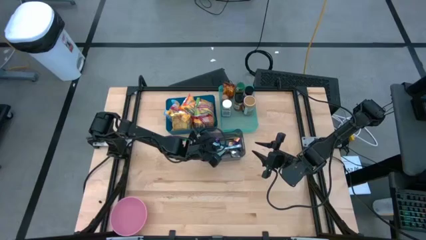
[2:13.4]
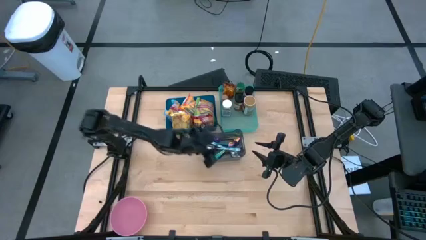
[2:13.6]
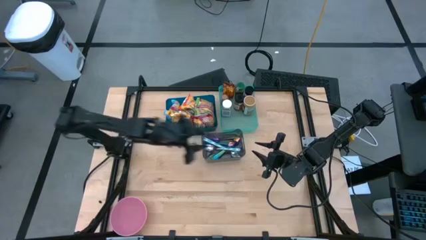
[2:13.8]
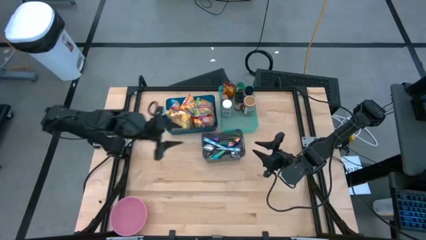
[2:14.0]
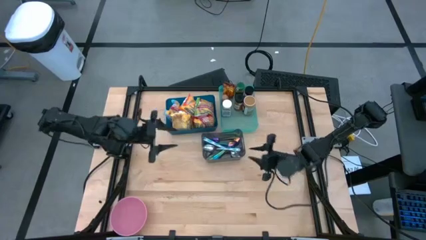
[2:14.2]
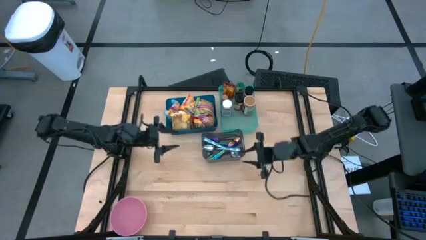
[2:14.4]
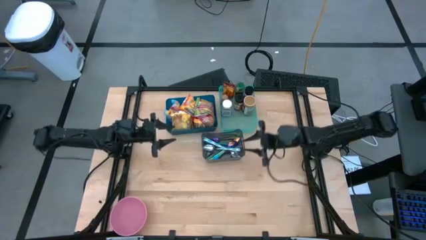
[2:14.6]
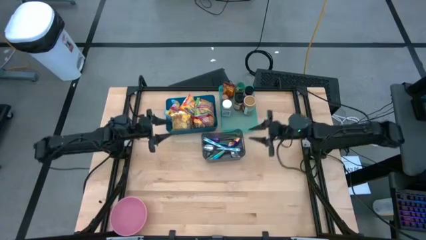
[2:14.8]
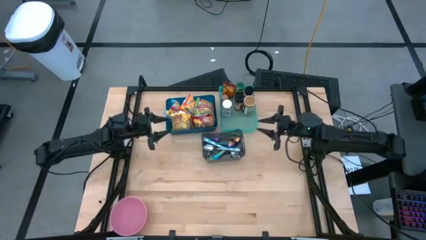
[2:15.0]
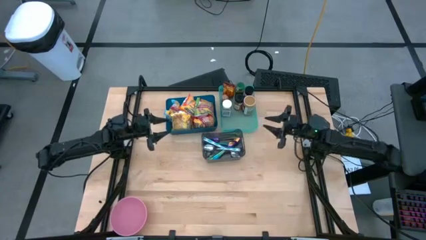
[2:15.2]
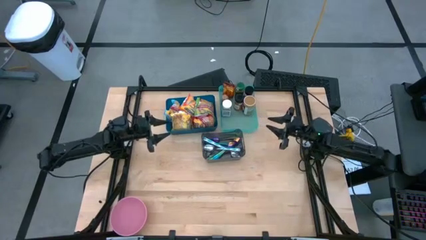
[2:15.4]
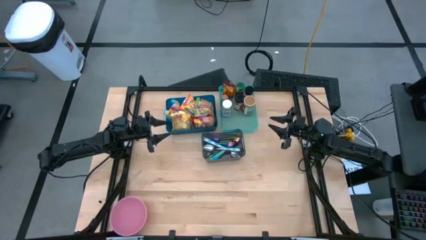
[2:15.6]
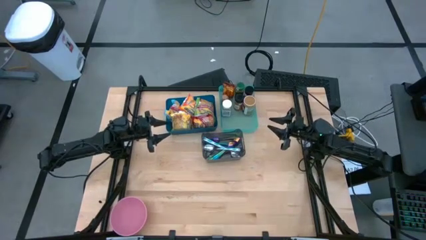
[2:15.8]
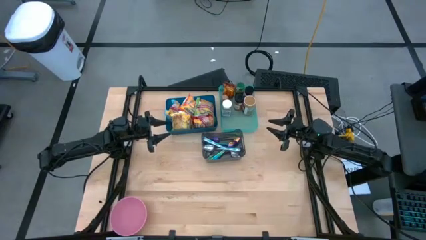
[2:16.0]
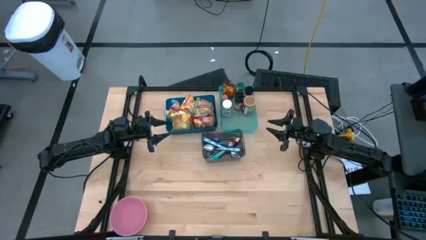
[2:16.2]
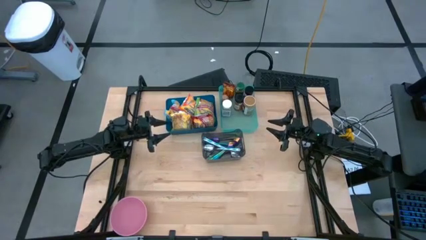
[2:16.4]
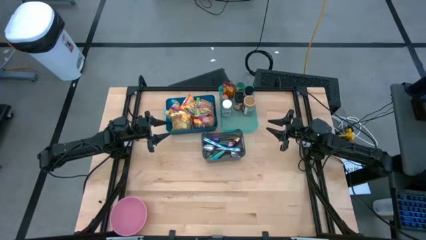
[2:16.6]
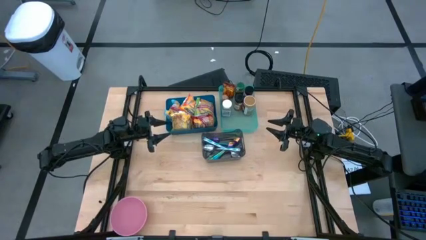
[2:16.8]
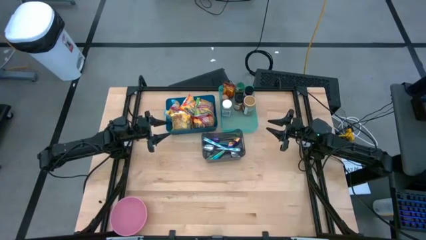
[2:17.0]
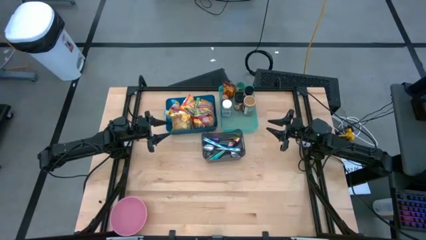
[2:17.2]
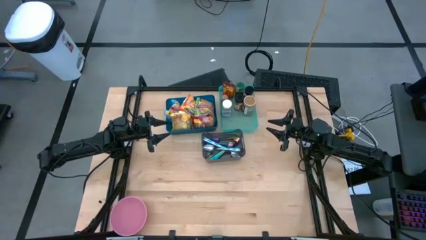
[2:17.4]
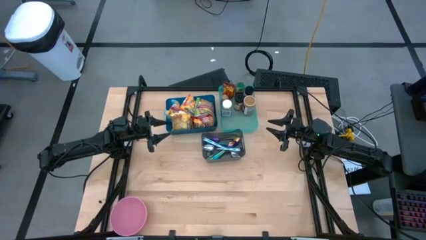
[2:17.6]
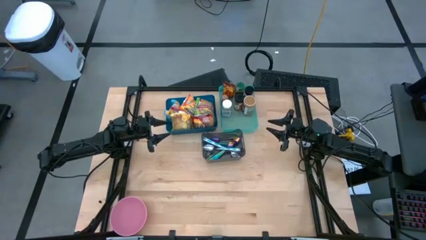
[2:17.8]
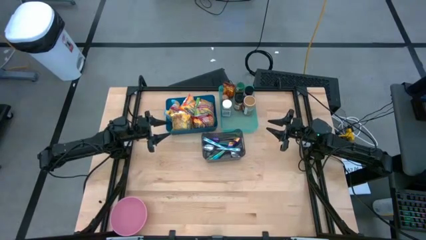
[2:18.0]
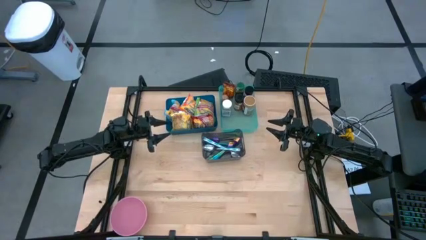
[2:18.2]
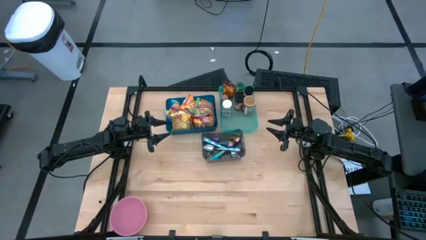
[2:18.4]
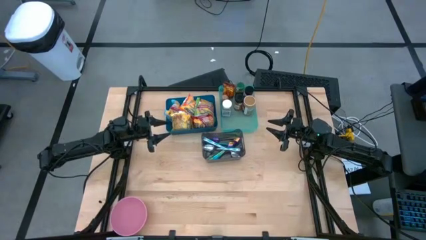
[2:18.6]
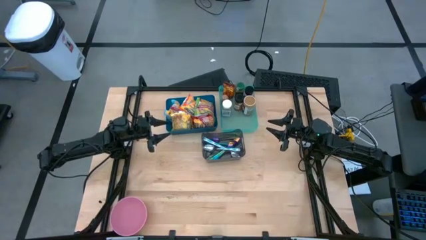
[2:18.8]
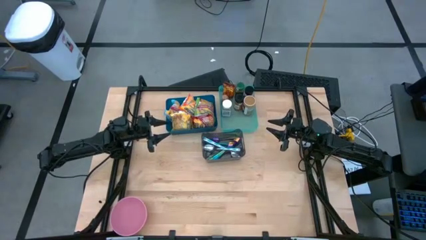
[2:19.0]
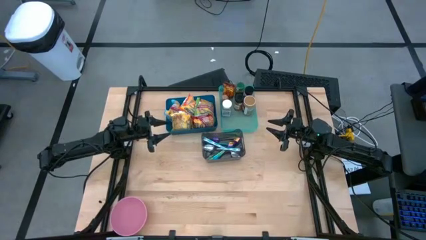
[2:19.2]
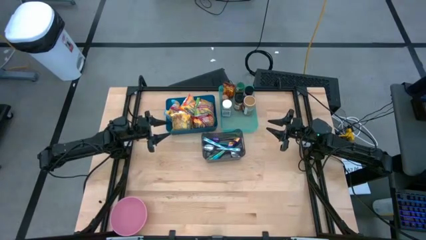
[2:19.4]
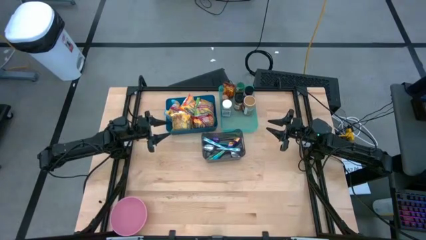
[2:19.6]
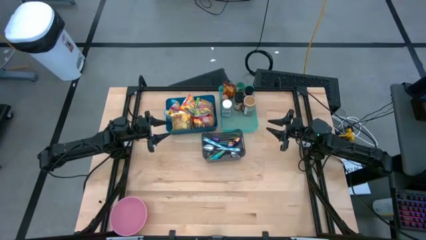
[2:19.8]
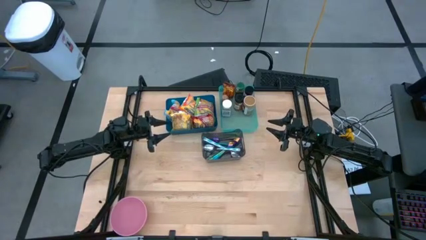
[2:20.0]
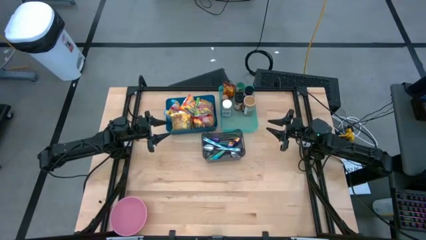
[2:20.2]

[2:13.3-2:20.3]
Task: Pick & Place Food Item
Return to Home Position

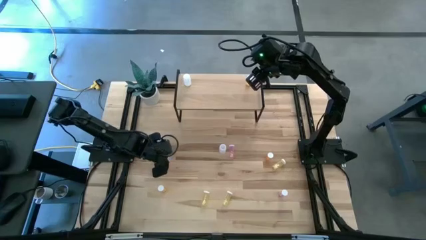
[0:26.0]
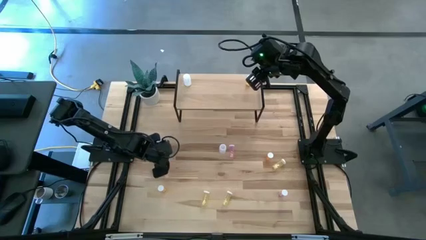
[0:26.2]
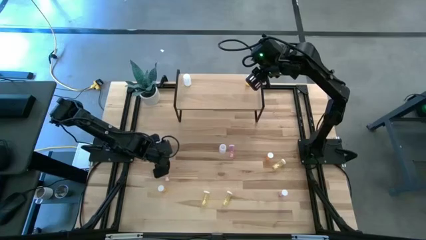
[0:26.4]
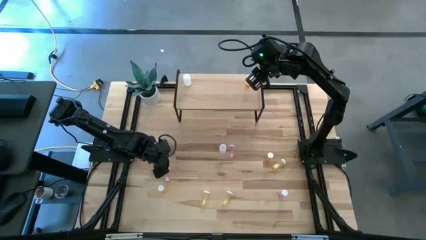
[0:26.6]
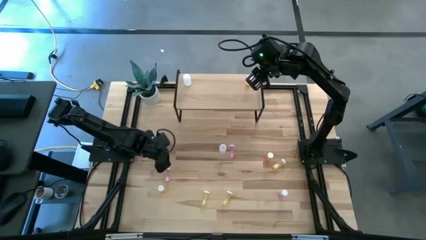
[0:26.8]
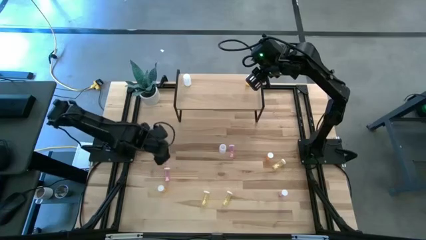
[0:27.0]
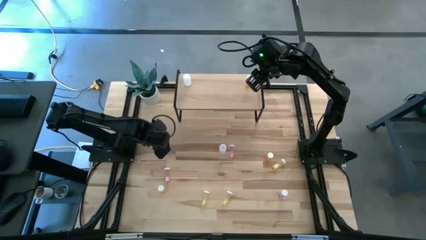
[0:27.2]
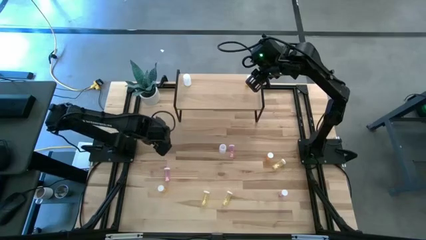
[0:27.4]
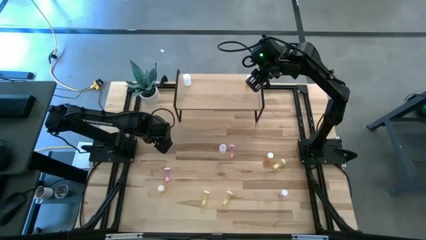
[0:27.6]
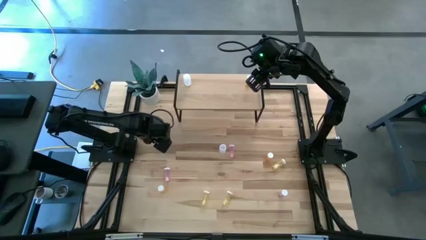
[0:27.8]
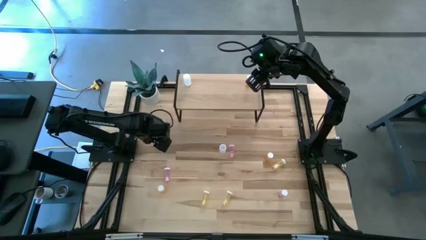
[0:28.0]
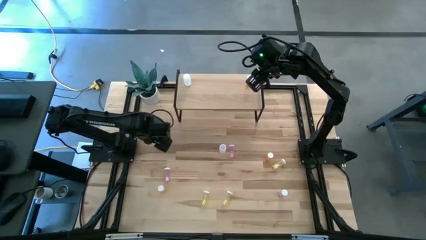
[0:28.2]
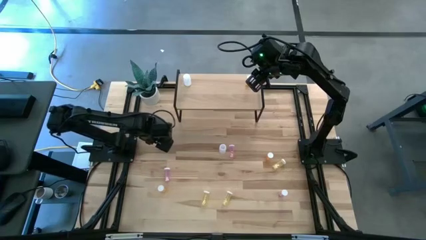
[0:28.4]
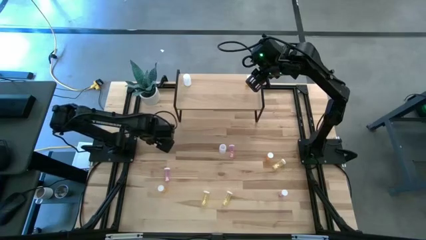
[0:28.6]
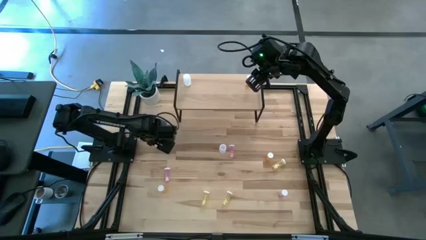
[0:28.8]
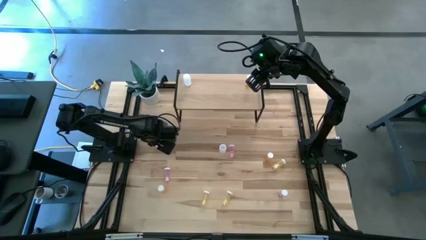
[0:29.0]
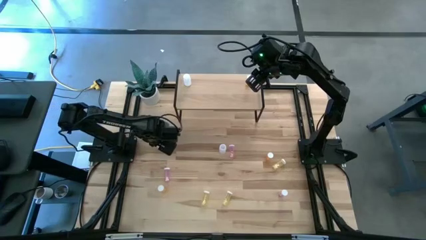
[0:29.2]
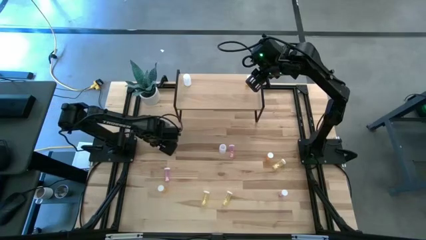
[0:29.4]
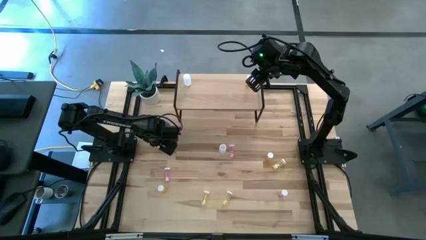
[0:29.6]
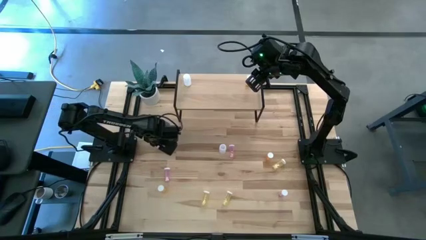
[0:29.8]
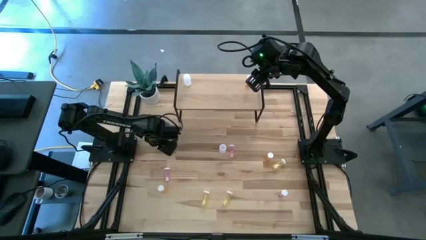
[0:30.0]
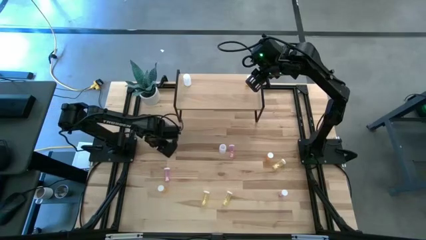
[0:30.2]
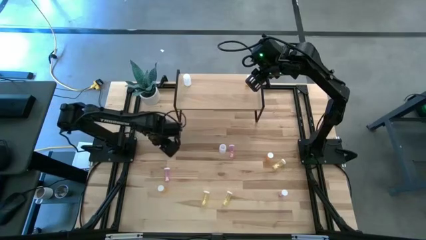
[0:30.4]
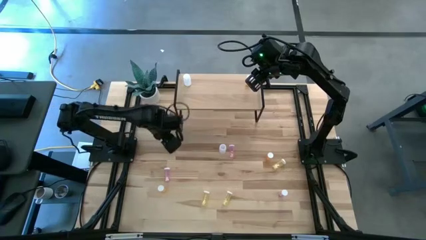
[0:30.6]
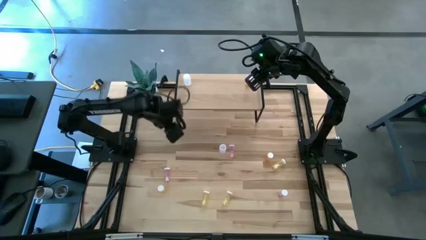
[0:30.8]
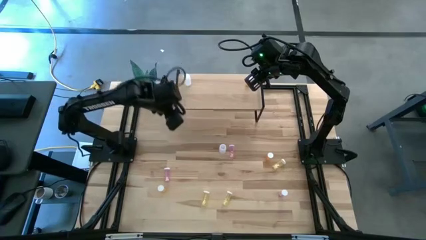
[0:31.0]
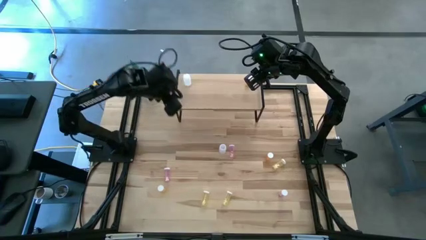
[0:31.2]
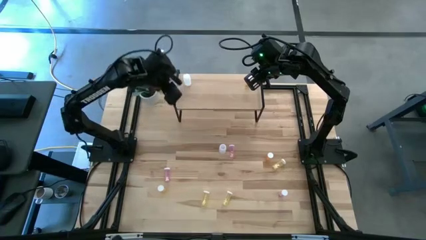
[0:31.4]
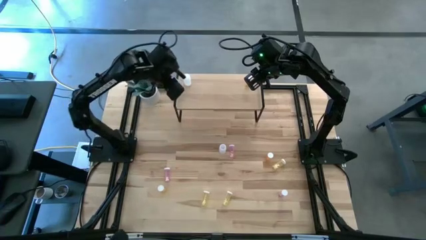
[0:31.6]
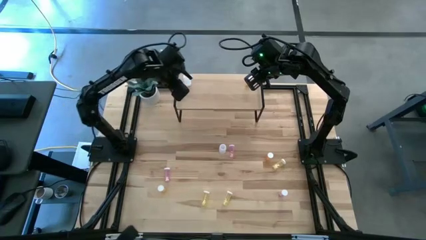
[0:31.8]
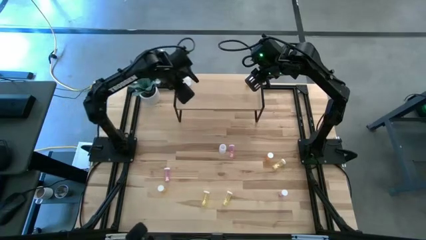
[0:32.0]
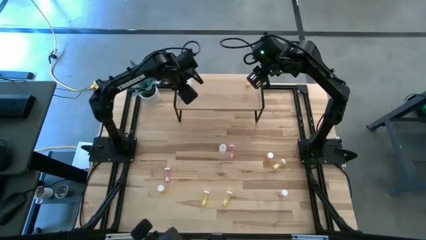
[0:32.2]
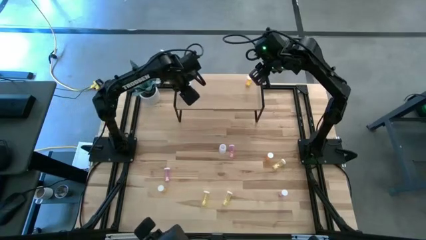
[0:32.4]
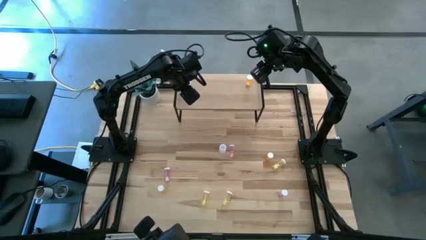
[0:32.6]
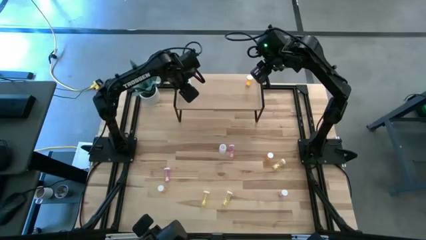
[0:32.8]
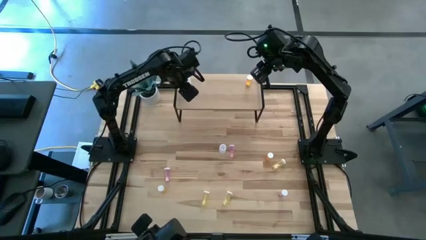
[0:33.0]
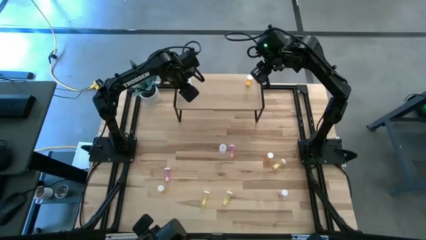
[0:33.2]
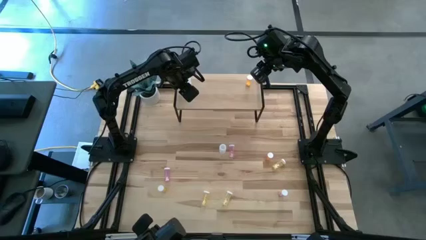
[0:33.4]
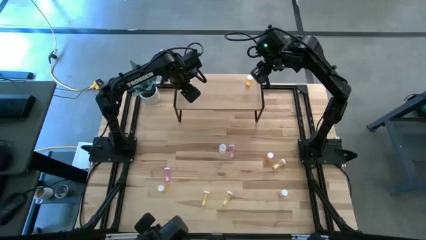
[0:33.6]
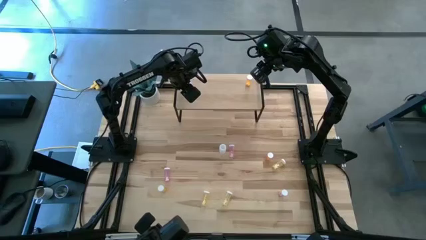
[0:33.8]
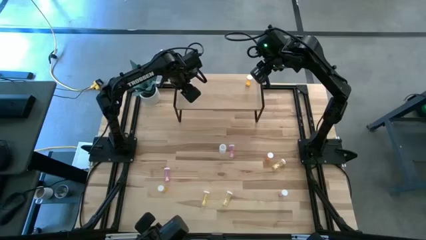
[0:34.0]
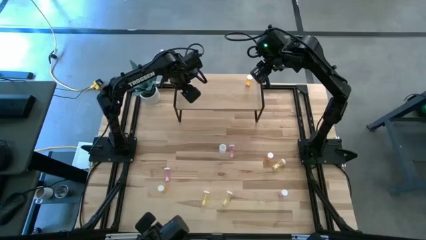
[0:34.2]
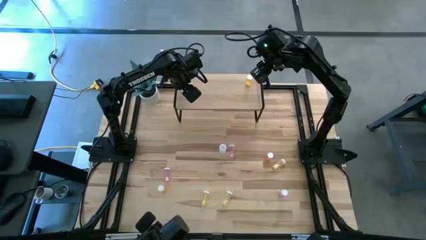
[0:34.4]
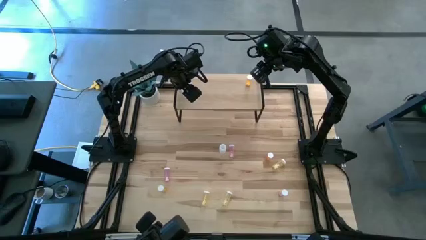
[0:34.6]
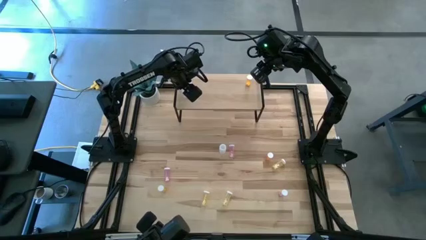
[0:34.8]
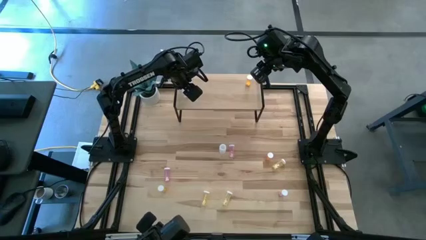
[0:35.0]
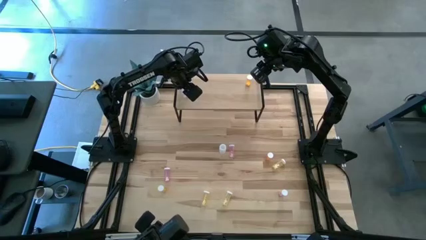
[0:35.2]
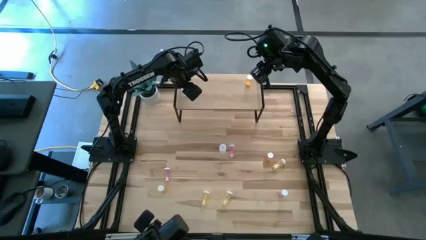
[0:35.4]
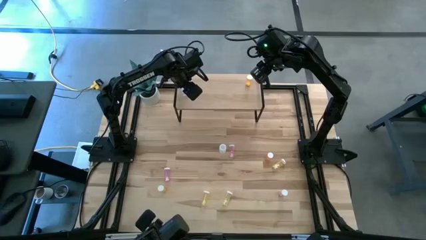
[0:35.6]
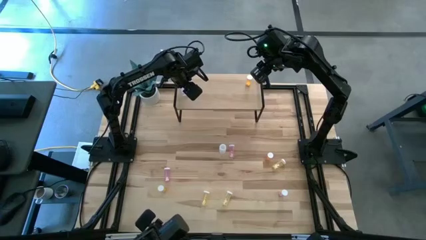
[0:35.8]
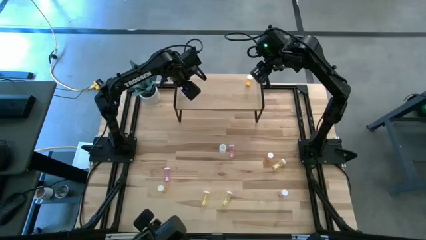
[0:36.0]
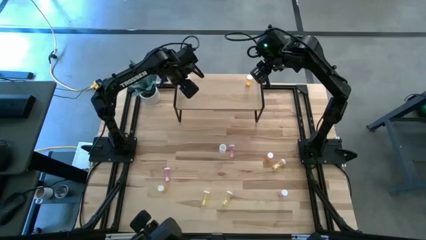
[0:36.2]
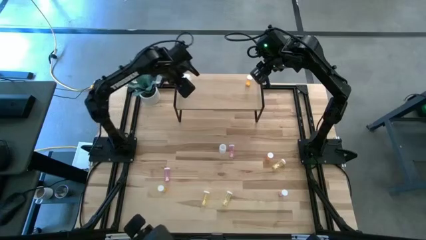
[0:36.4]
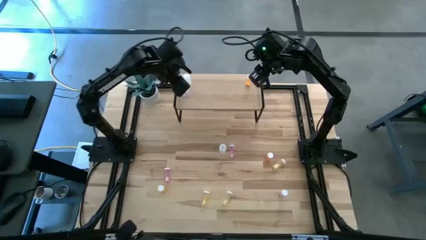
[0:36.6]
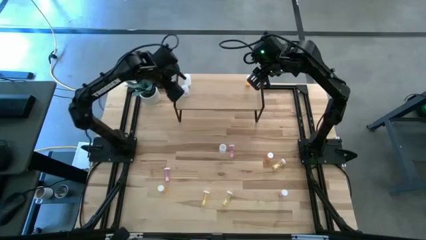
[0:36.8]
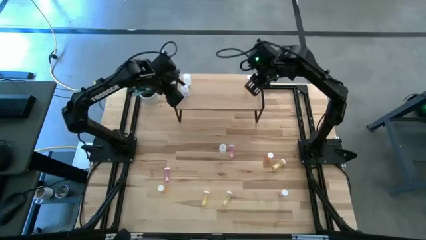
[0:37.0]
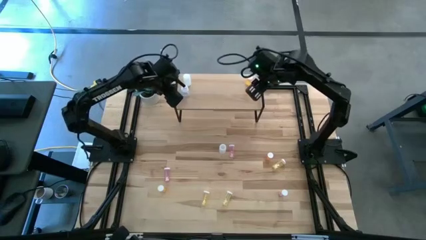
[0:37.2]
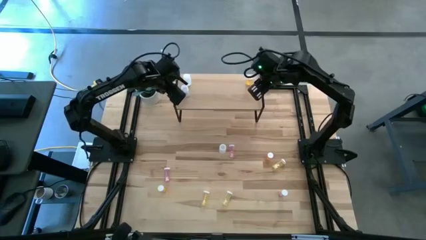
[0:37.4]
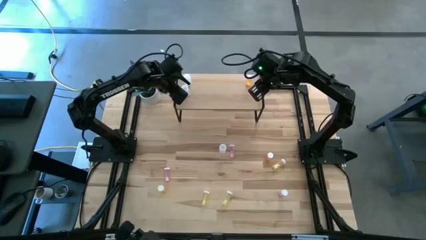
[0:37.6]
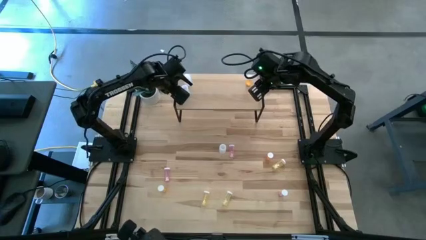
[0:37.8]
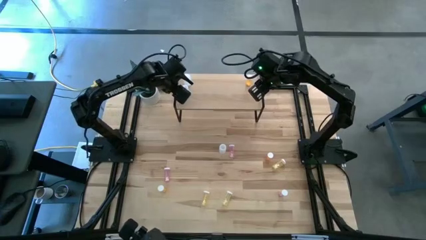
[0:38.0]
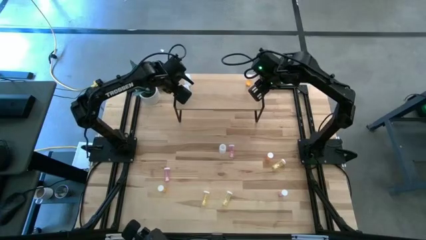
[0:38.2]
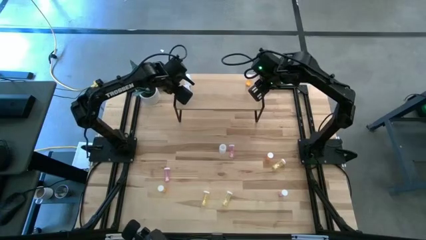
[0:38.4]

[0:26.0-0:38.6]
Task: Pick and place medicine bottles onto shelf by color
Put the left white pill bottle aligned with white pill bottle on the shelf
